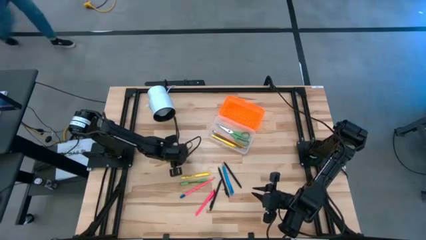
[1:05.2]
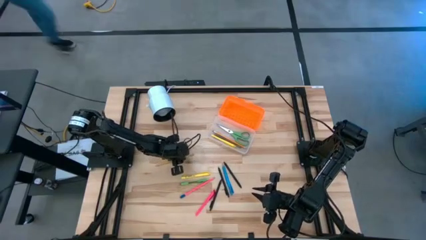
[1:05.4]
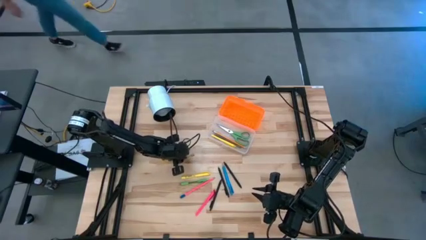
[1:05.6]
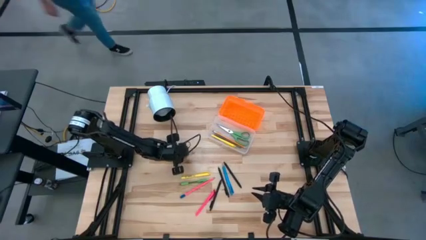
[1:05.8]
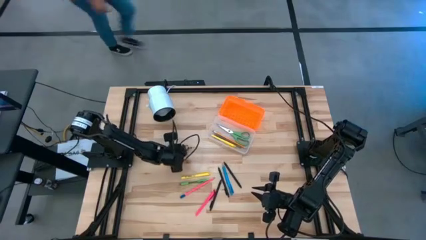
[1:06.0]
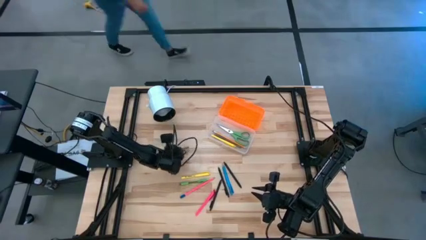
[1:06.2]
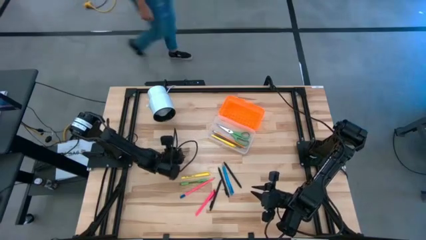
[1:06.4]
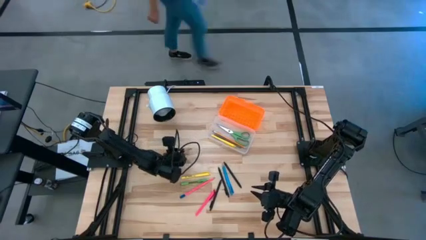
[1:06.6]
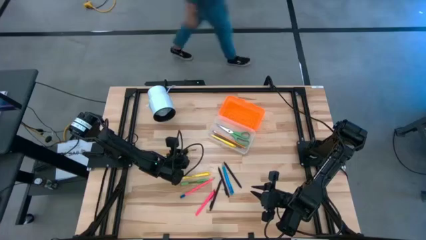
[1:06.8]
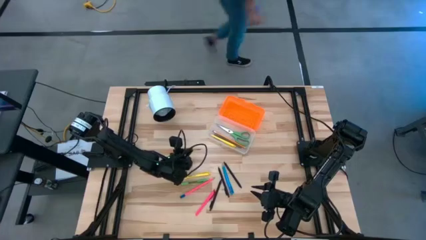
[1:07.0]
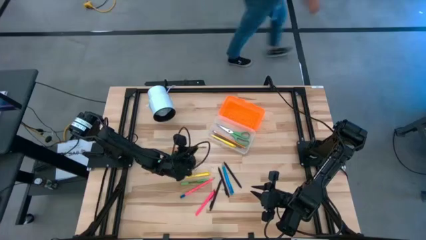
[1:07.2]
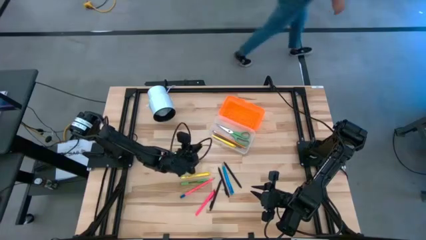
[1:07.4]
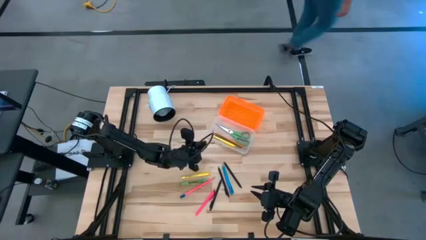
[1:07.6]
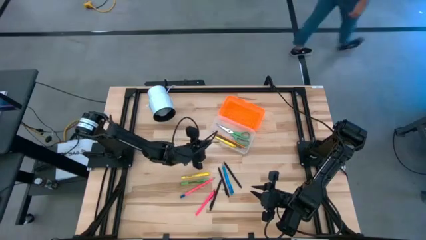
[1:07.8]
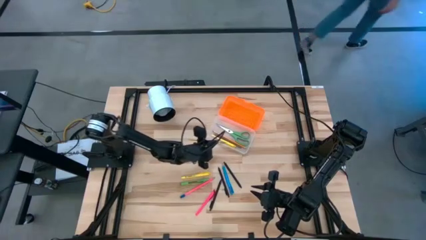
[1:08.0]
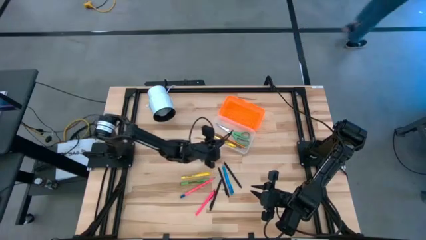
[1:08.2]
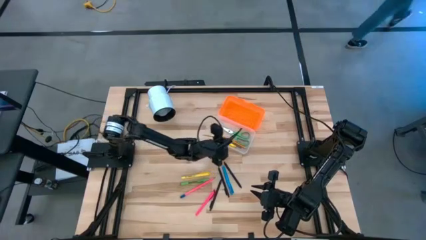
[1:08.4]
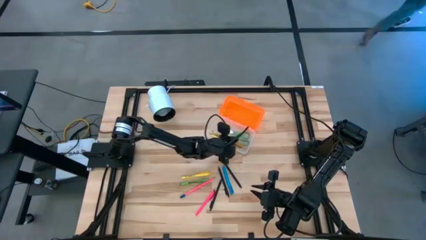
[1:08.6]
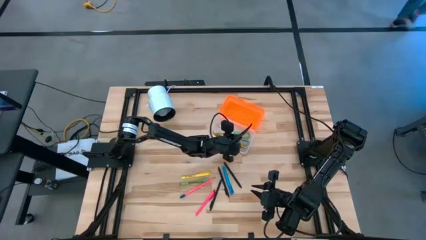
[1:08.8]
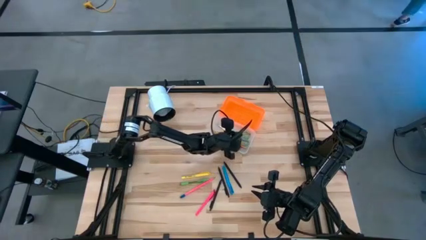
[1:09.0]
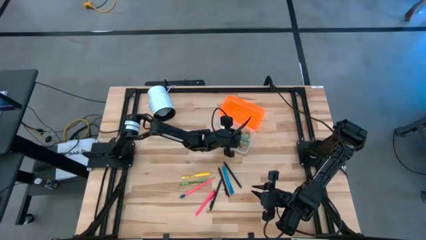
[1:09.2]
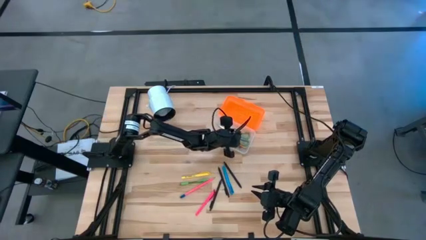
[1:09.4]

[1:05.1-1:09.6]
Task: Pick & place school supplies into a supply box
Put the yellow pencil into the supply box

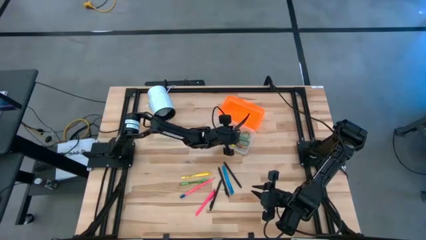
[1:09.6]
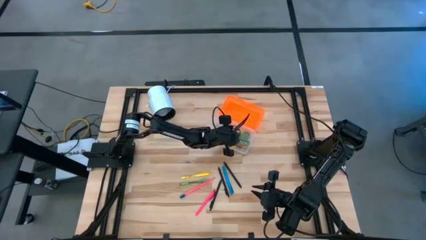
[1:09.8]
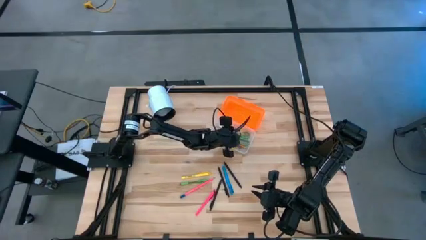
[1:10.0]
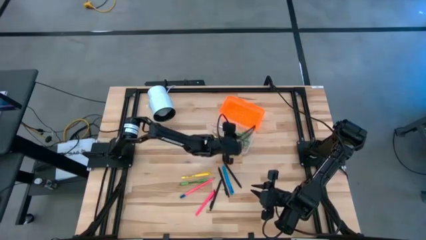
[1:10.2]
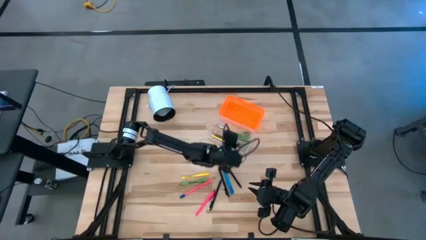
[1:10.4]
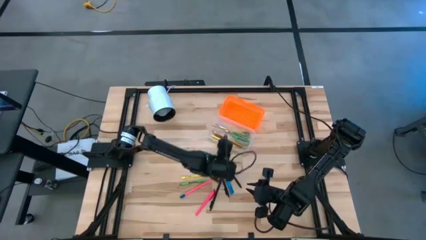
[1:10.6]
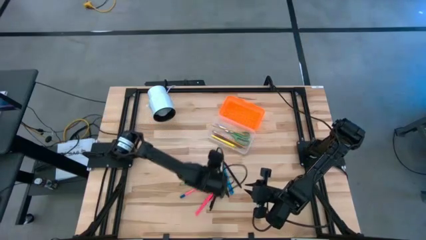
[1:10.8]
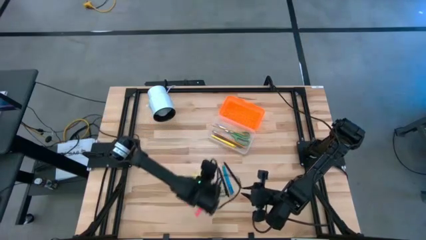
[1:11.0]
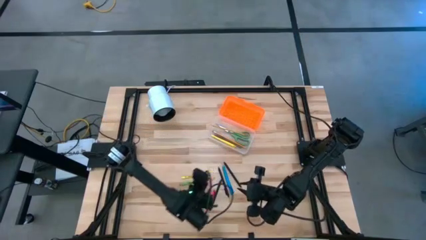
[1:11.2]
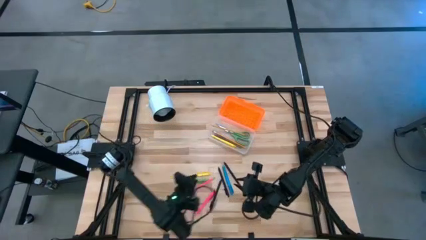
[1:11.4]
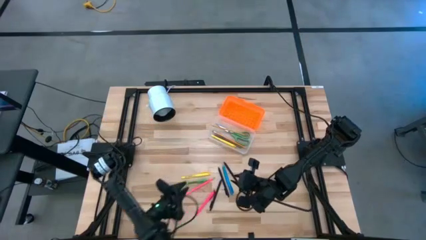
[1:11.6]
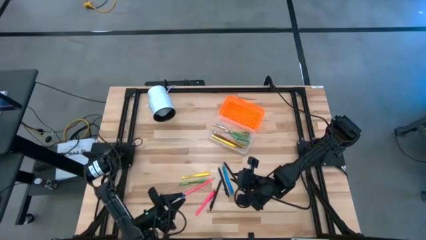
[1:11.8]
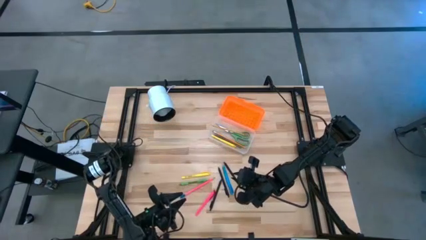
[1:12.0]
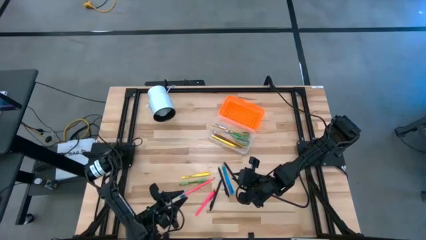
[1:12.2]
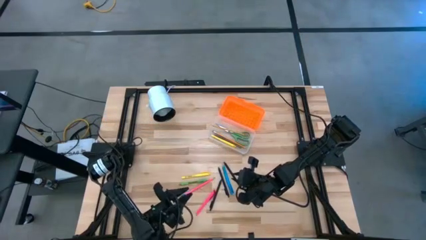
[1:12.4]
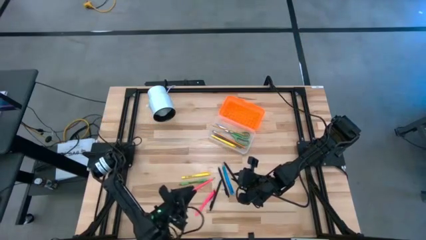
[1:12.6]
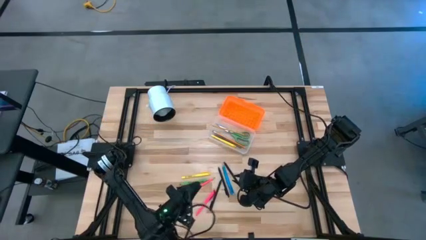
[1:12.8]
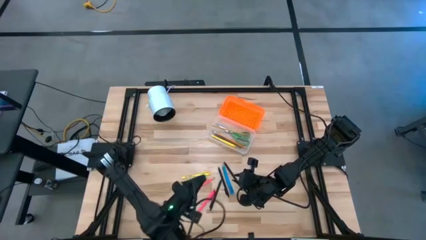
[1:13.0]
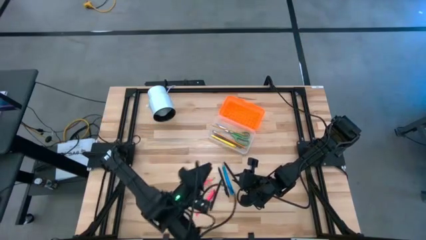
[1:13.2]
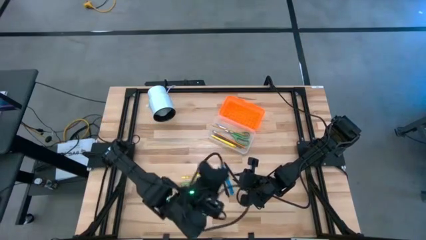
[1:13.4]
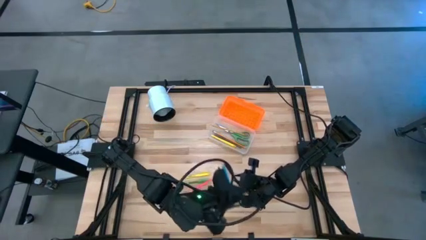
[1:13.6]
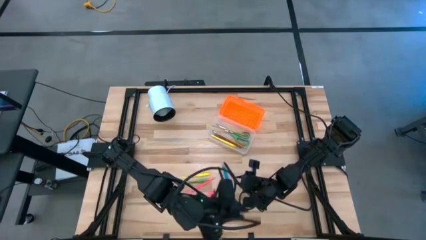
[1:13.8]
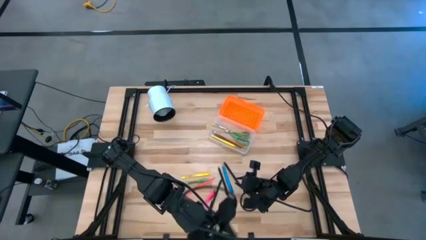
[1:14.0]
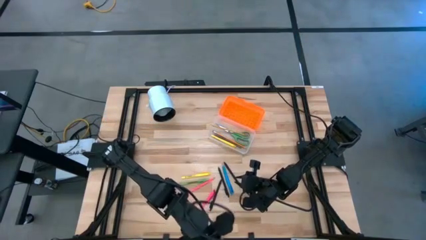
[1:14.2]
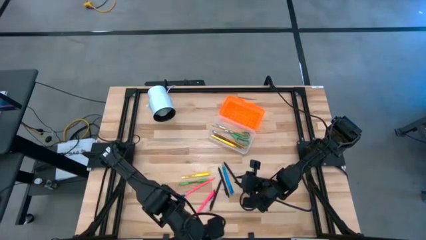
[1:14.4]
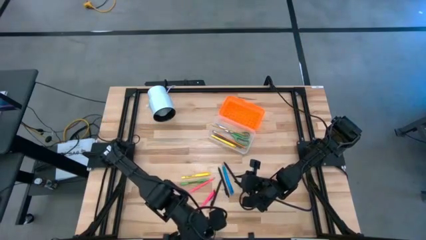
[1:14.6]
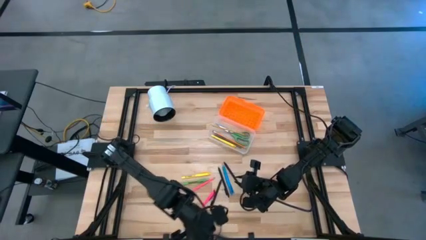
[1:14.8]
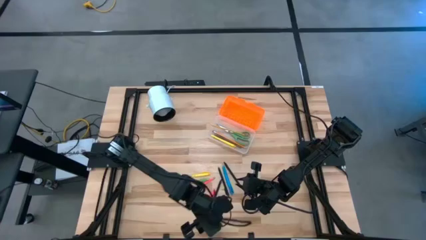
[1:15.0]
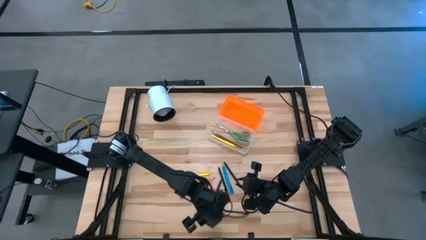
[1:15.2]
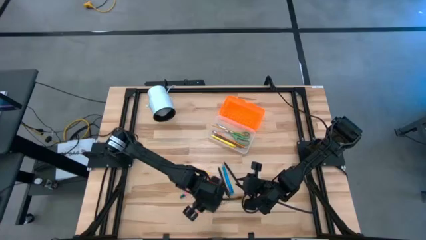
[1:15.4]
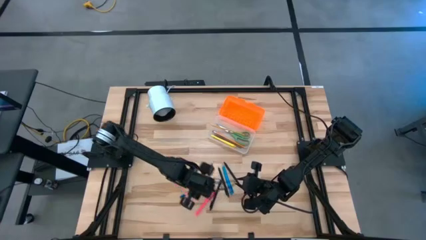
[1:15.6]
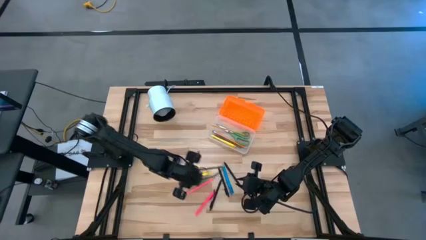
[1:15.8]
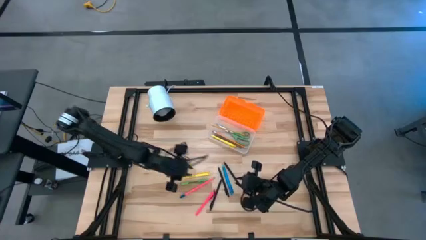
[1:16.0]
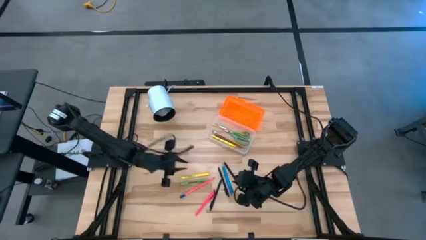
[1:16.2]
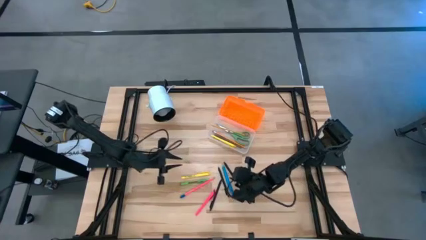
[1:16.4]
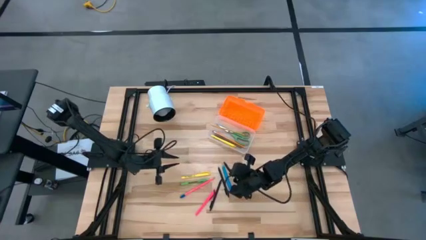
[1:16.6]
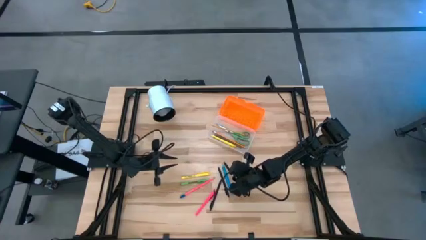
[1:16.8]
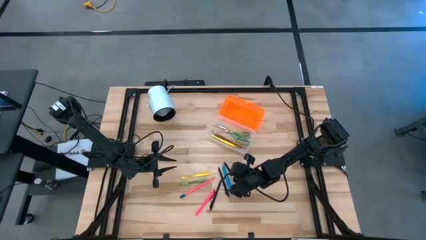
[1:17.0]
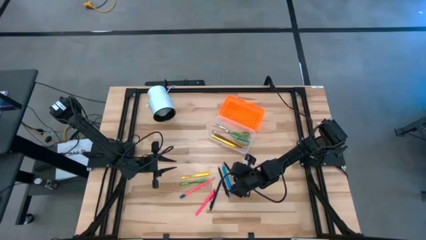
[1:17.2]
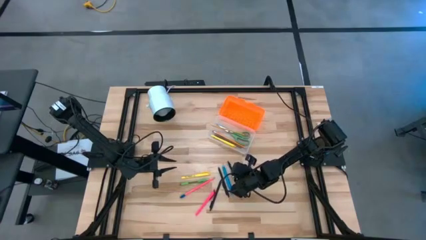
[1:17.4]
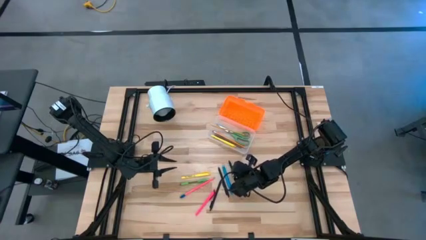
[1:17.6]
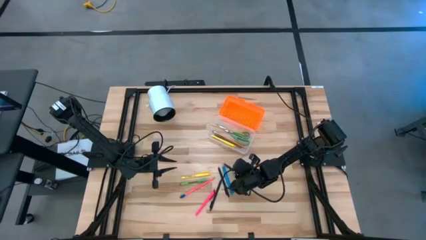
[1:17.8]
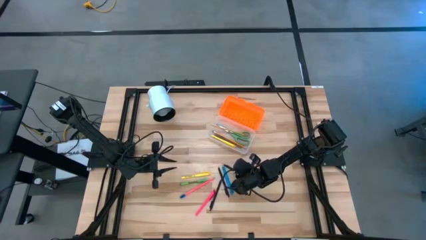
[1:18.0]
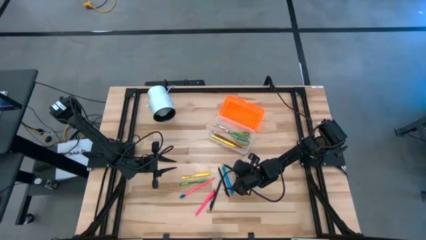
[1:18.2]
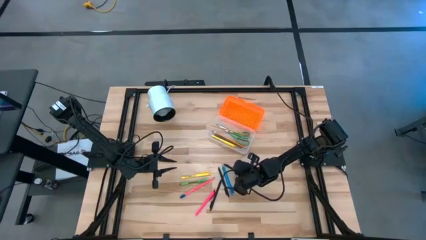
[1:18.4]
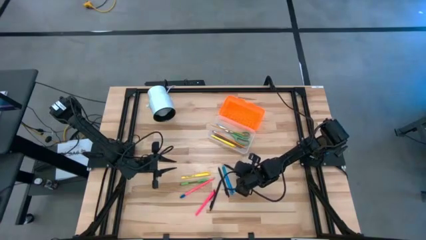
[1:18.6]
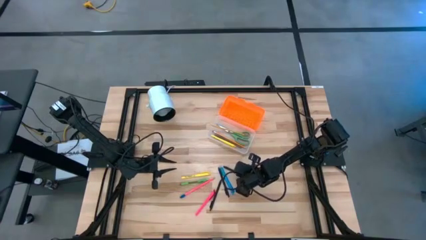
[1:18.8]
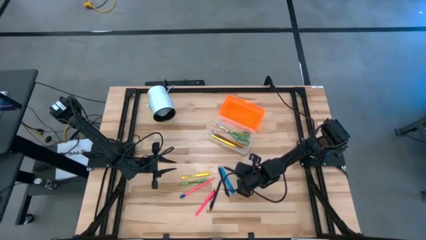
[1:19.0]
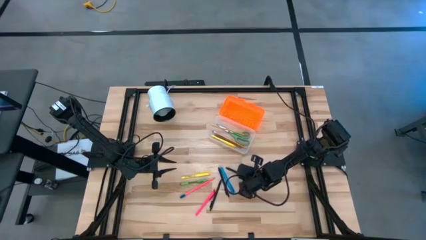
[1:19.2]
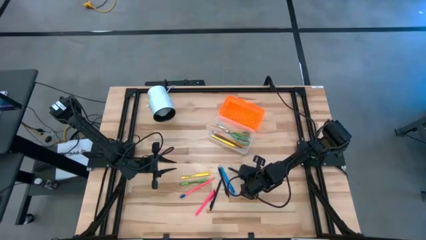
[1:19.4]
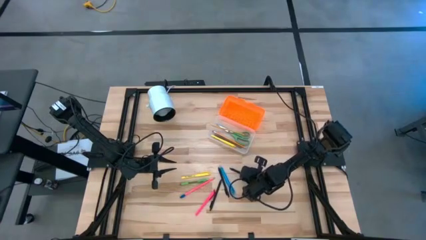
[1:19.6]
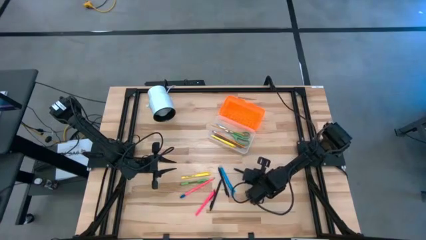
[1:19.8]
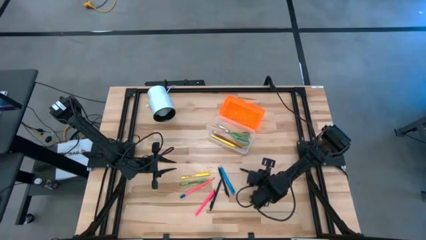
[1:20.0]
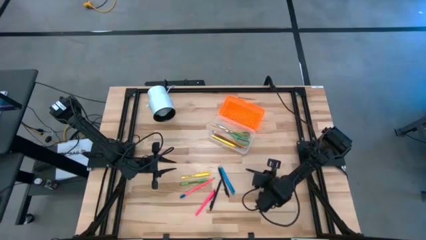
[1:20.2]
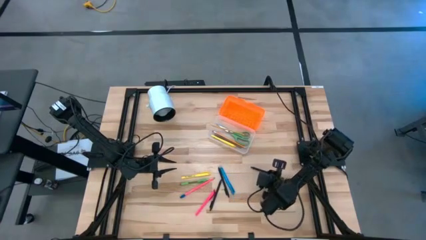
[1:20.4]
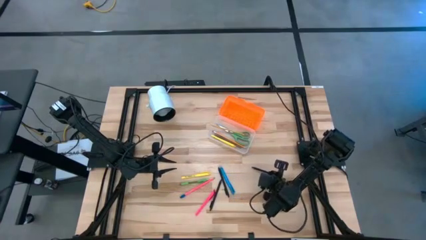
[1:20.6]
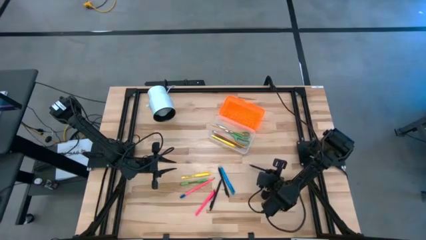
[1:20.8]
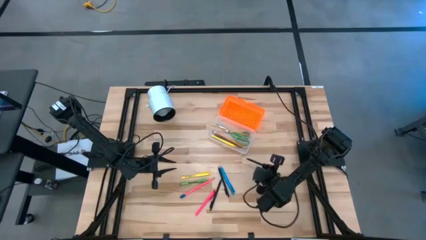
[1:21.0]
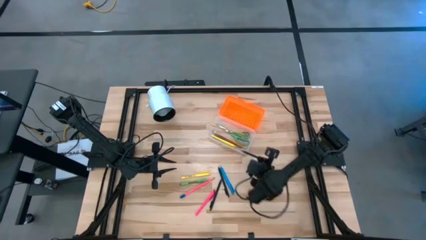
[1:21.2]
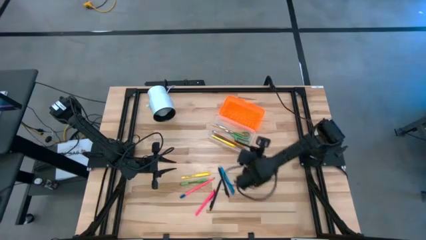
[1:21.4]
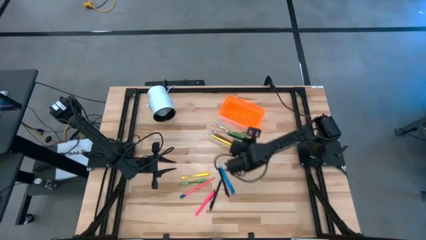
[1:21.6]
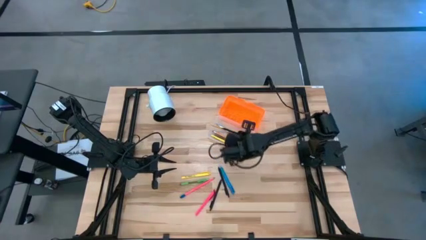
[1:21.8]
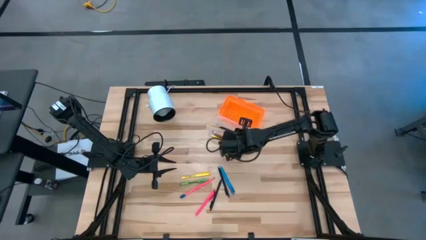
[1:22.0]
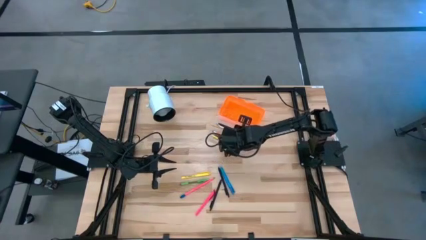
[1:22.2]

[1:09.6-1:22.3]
Put the right black pen into the supply box
